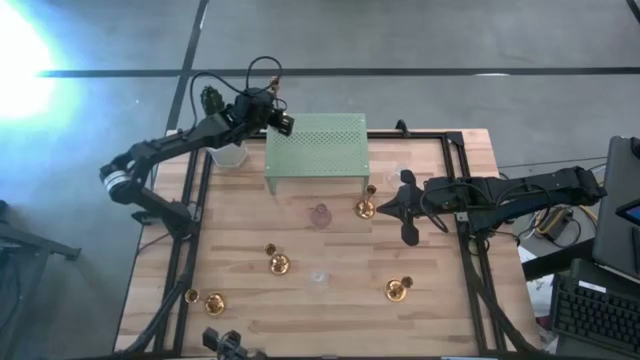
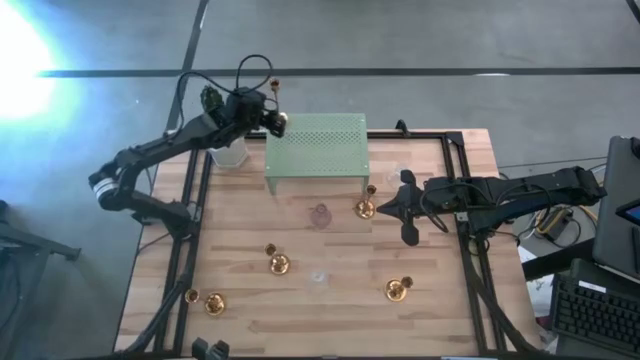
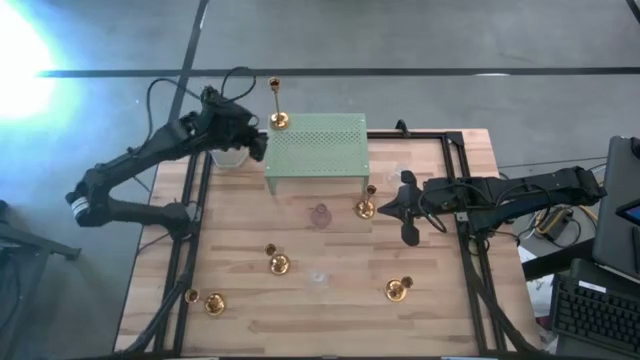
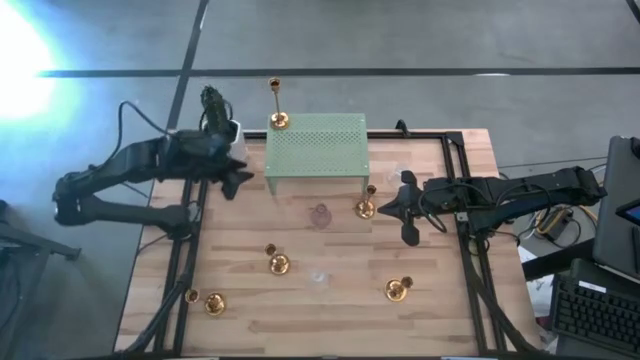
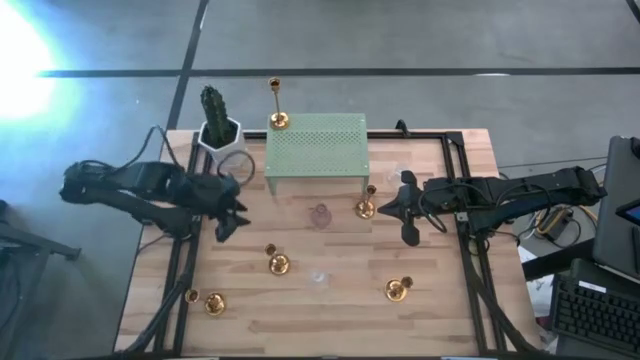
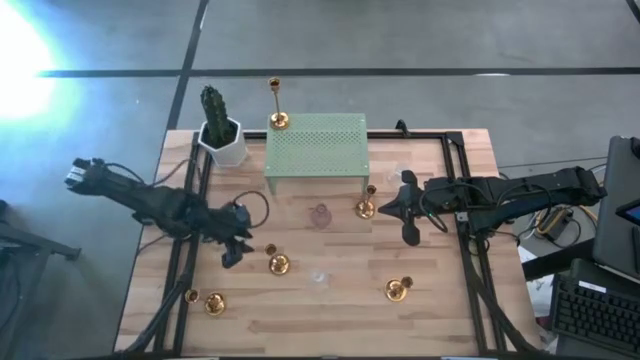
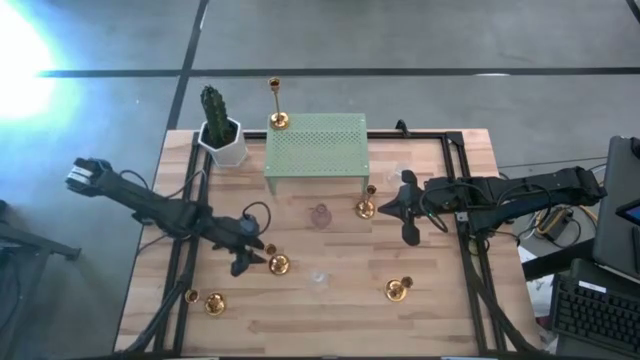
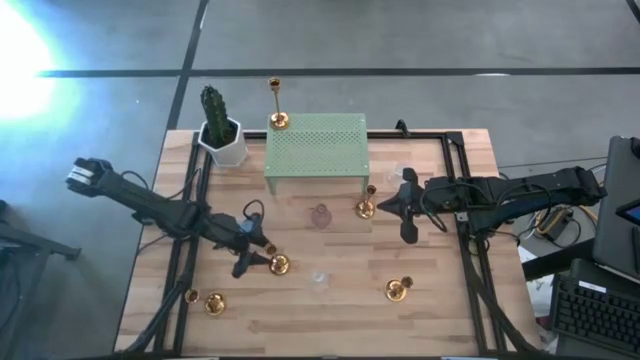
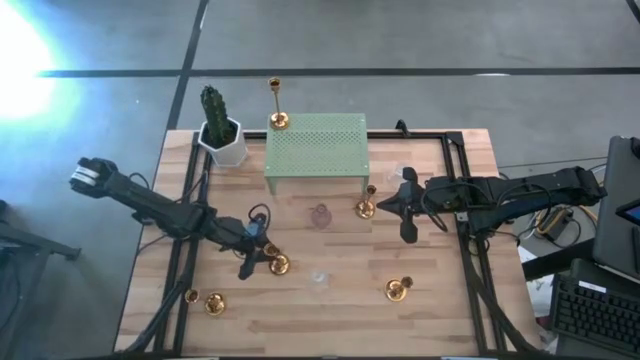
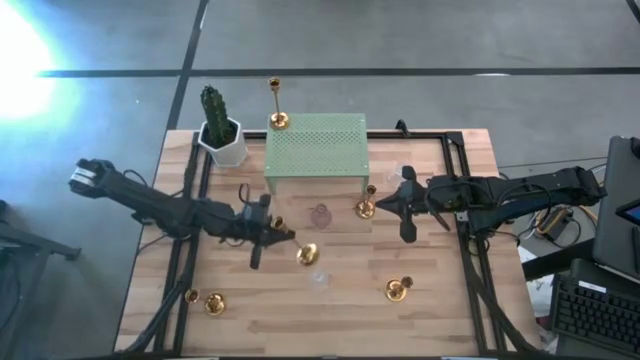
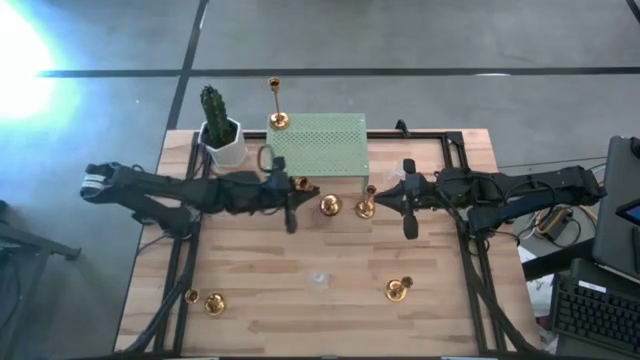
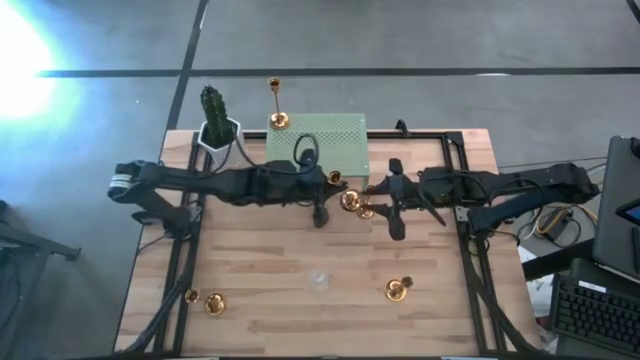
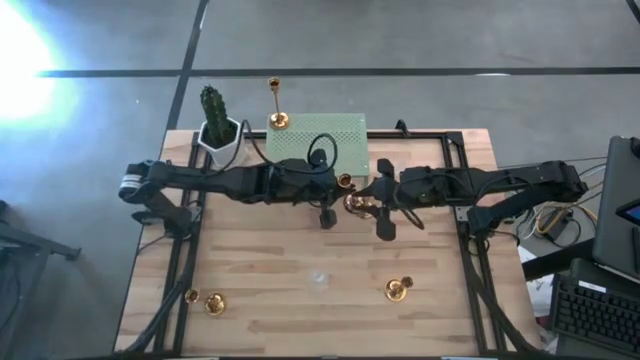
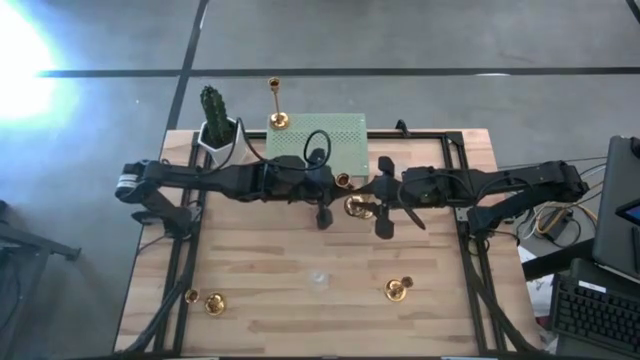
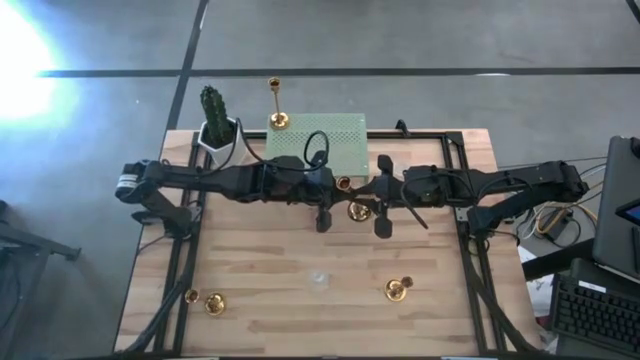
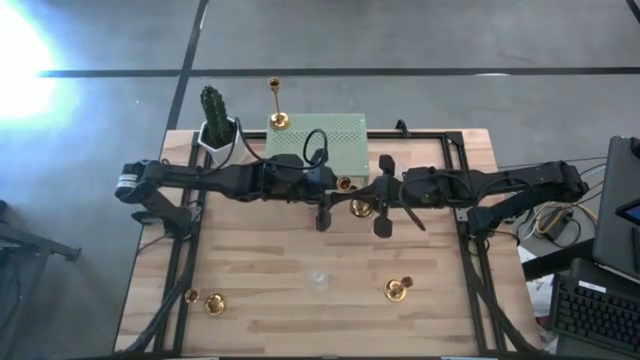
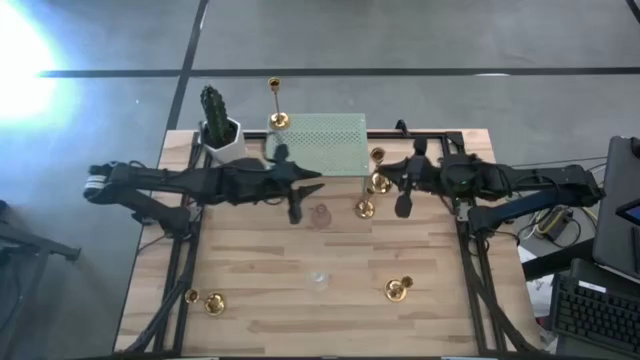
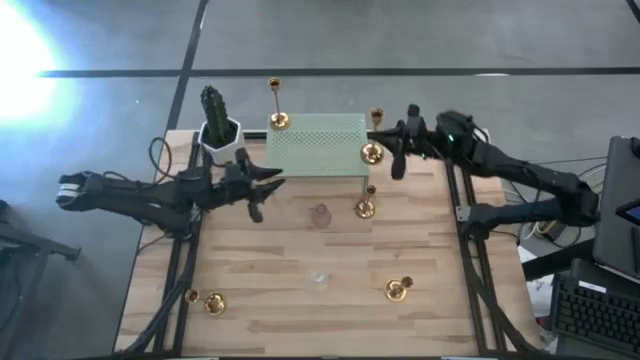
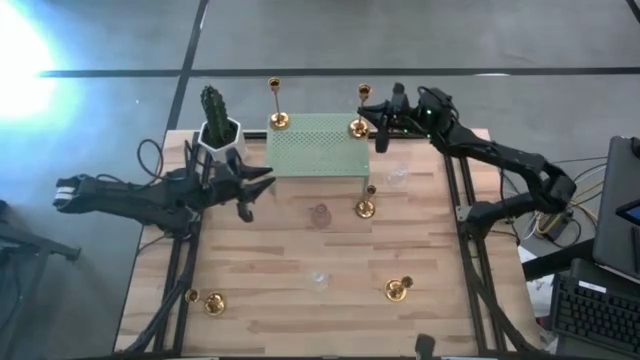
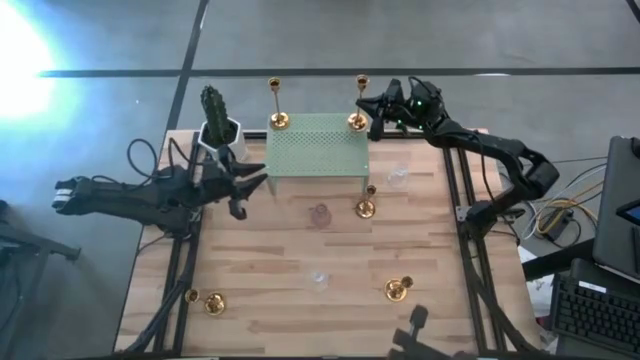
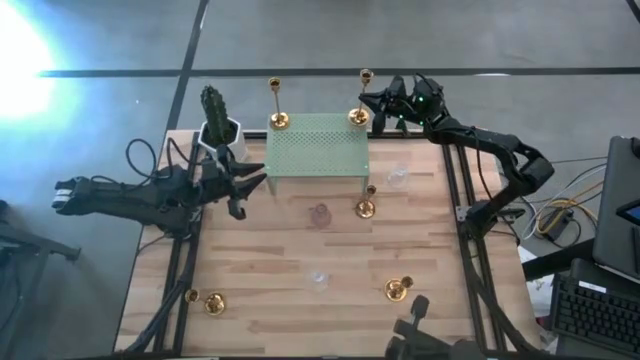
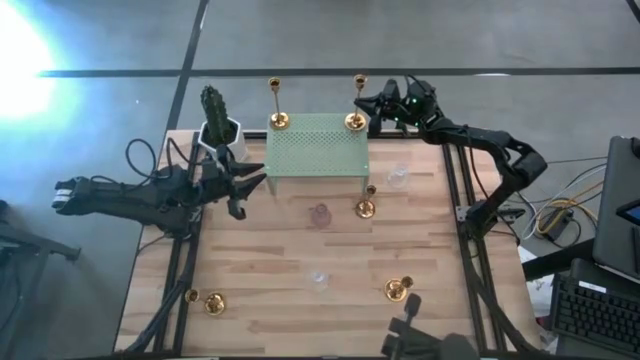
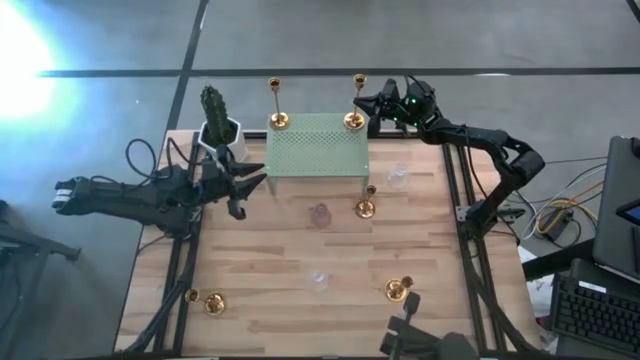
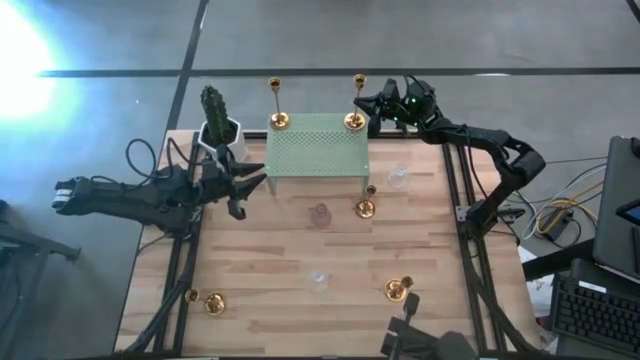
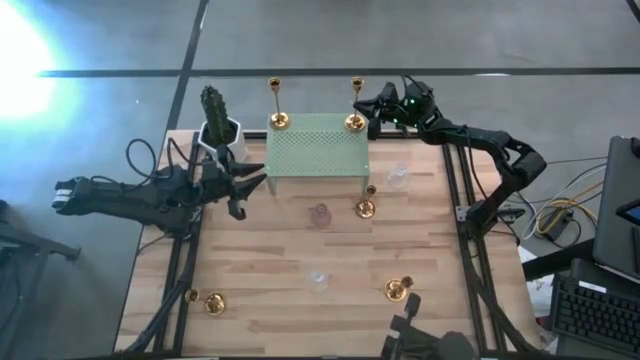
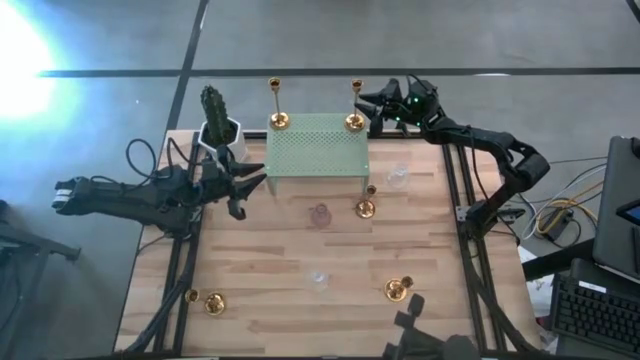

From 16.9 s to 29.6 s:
Task: Pick & Place candle stick holders
Put the gold candle holder on the shelf

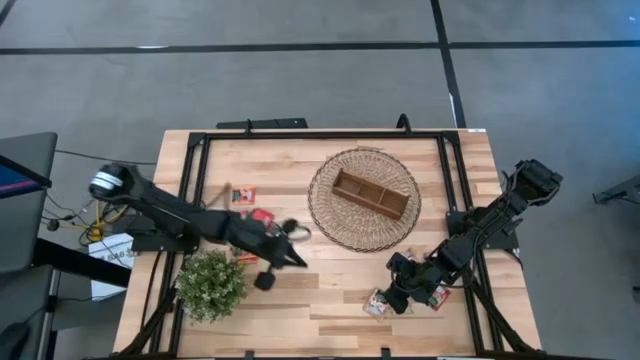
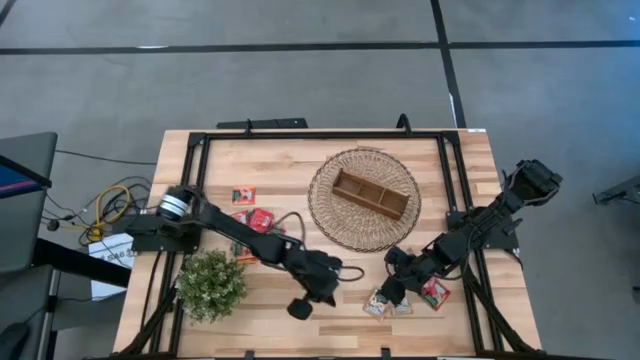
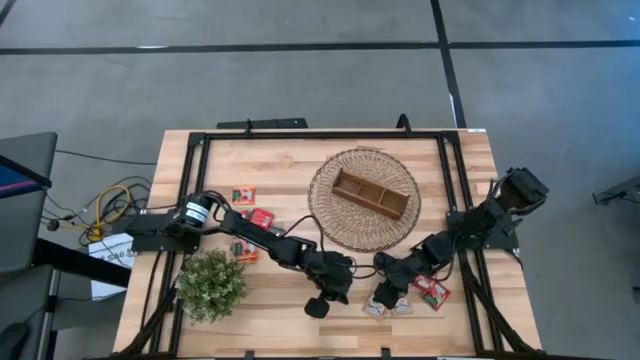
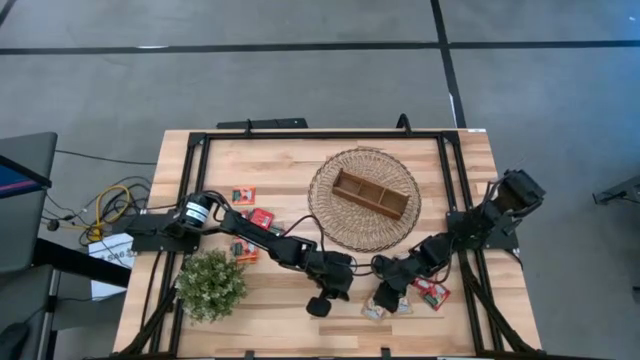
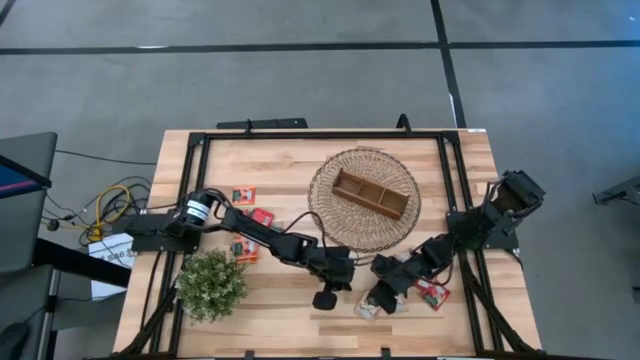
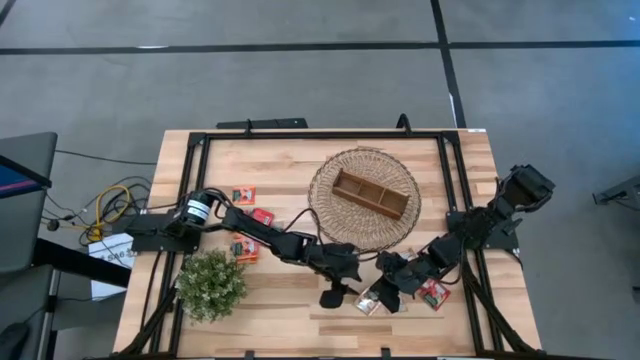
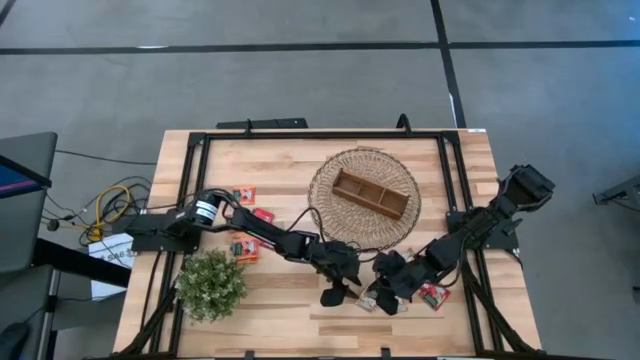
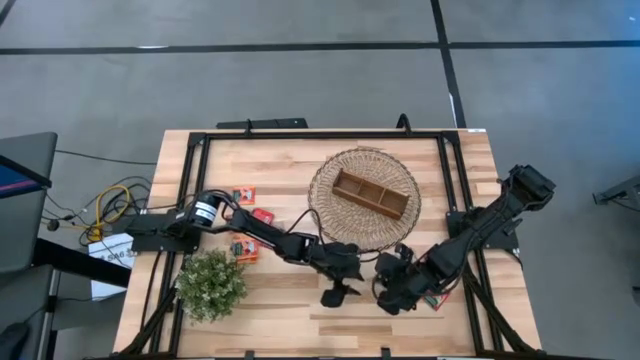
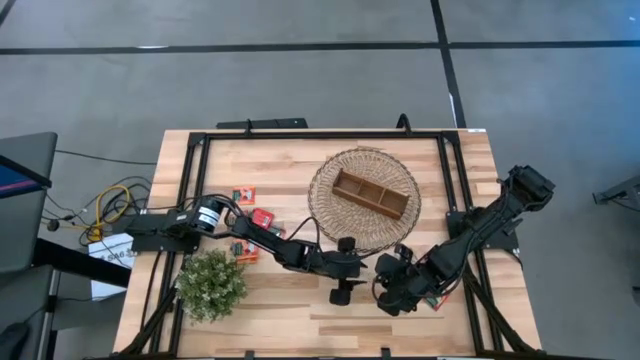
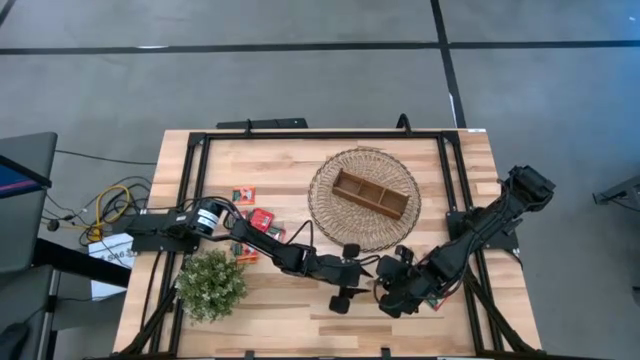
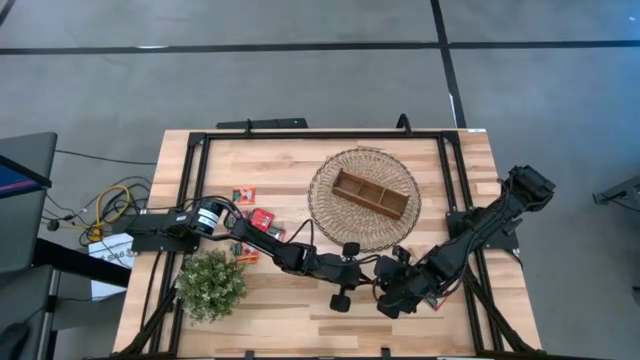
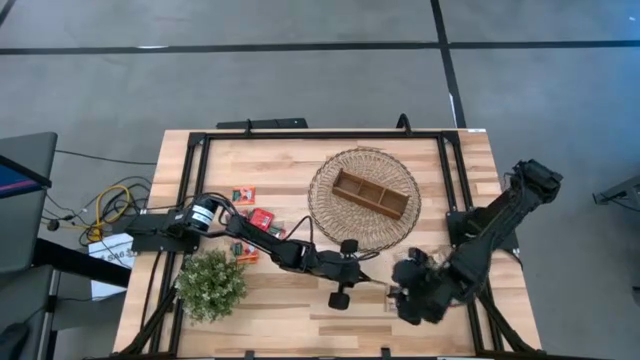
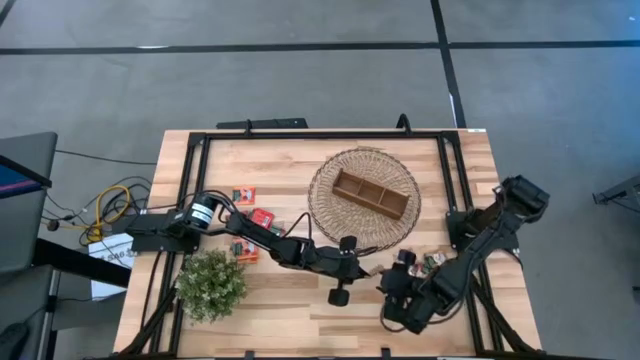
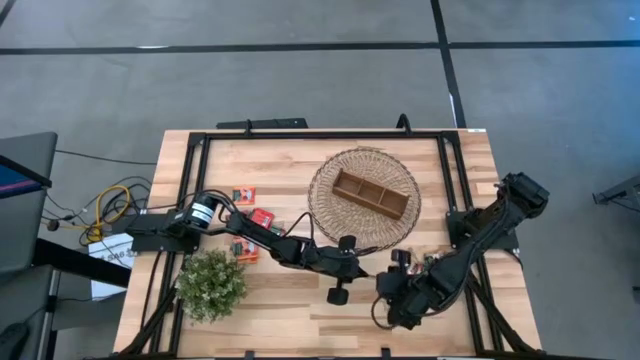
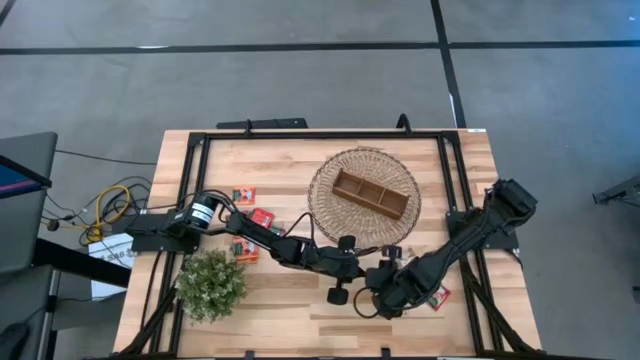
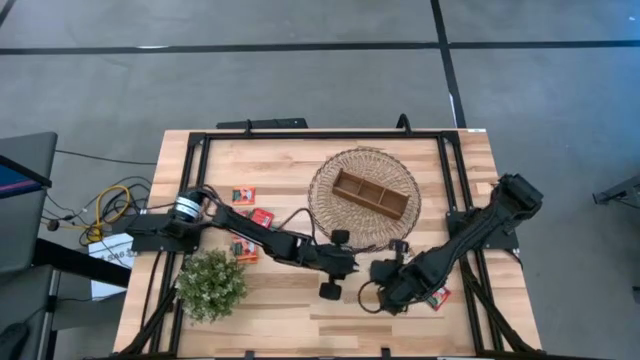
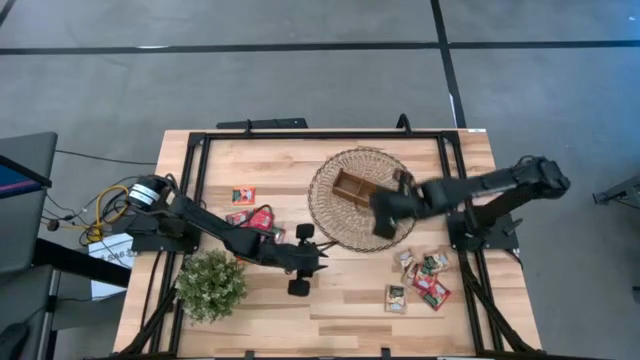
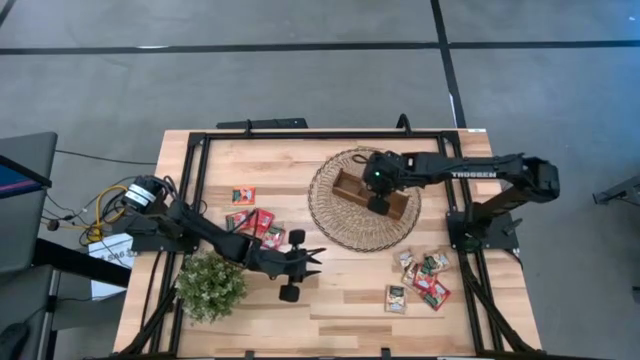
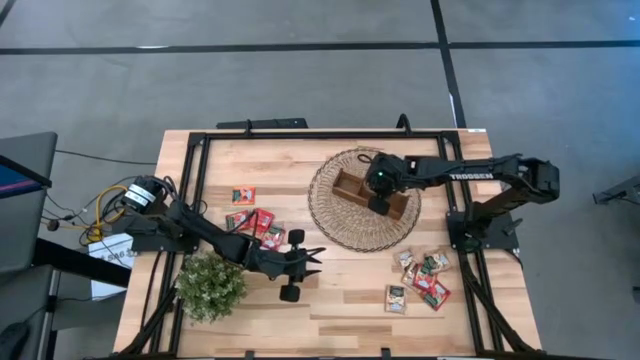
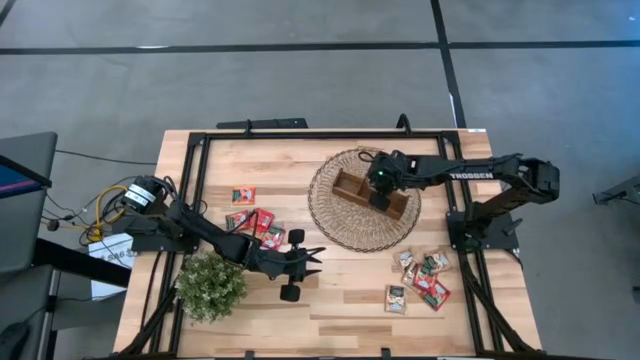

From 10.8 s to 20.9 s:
Task: Pick & Place Tea
Put the brown tea bag into the middle section of the wooden organizer
